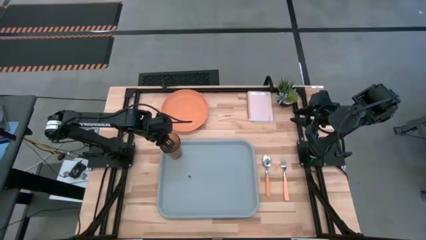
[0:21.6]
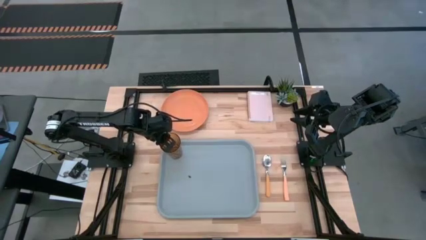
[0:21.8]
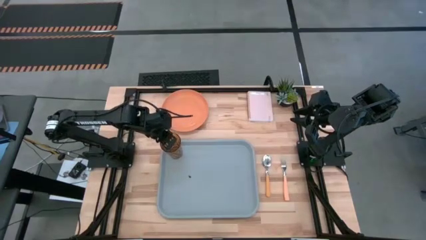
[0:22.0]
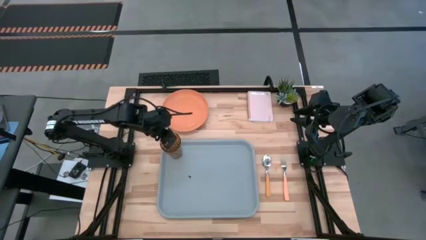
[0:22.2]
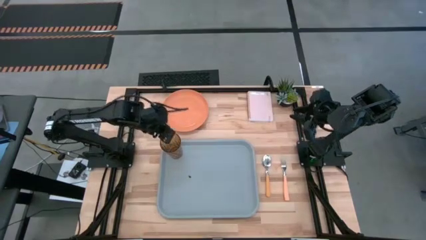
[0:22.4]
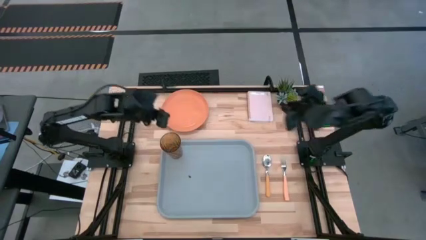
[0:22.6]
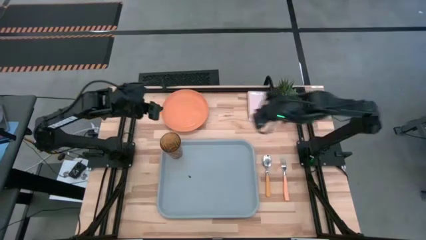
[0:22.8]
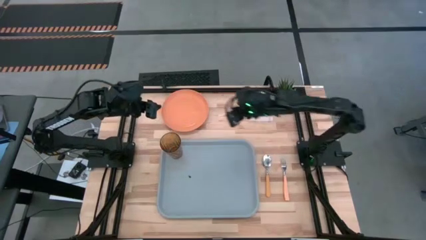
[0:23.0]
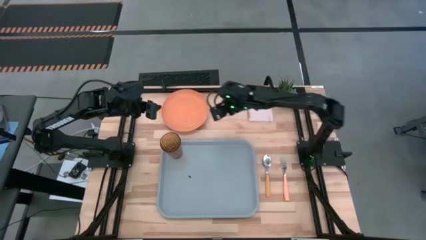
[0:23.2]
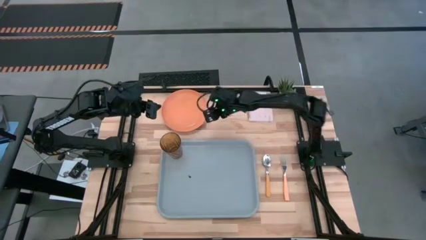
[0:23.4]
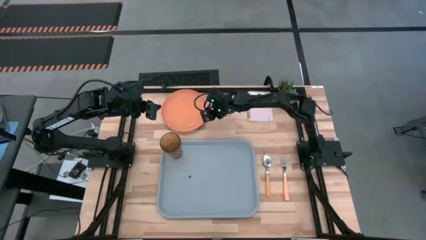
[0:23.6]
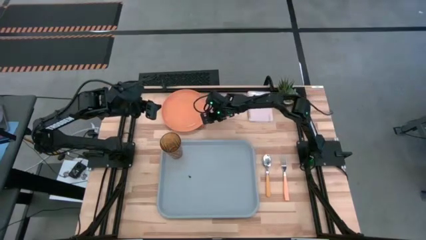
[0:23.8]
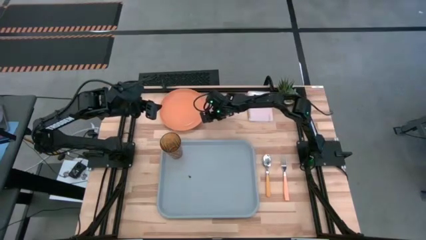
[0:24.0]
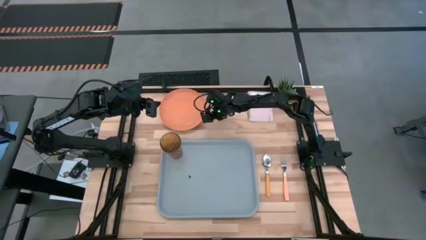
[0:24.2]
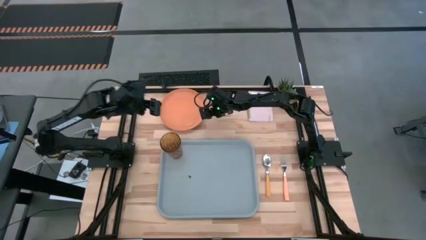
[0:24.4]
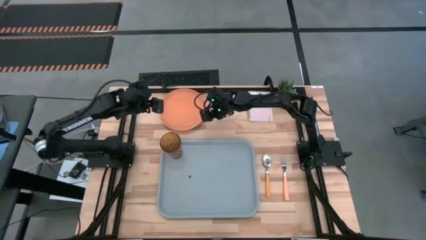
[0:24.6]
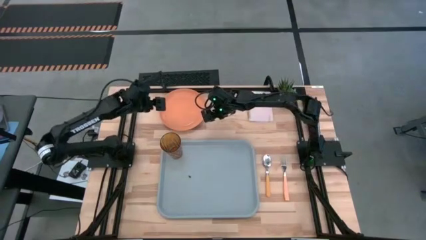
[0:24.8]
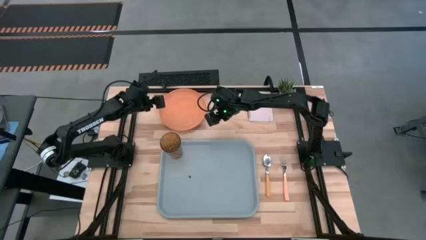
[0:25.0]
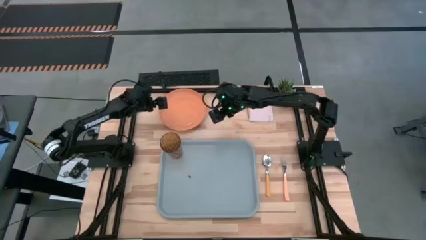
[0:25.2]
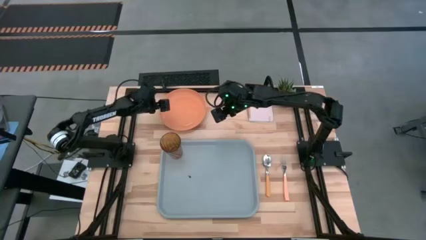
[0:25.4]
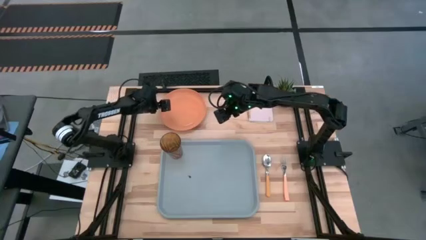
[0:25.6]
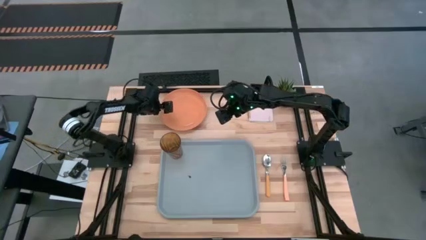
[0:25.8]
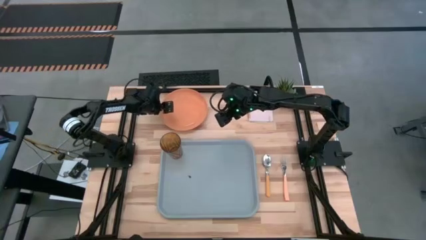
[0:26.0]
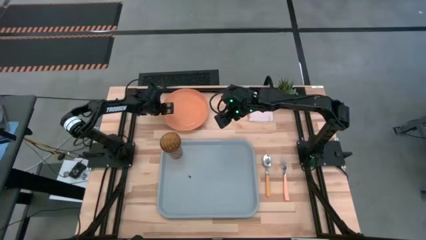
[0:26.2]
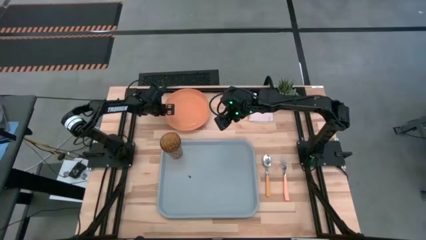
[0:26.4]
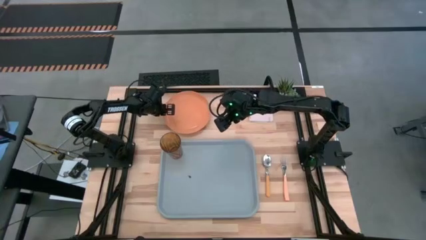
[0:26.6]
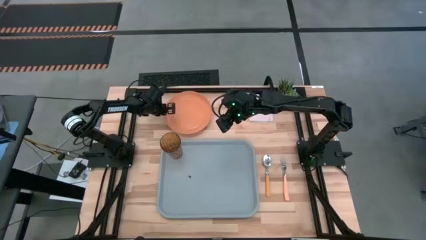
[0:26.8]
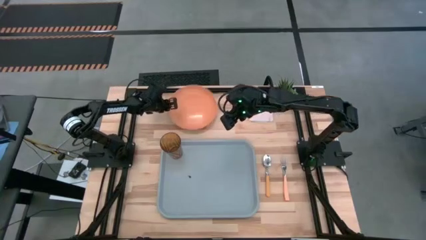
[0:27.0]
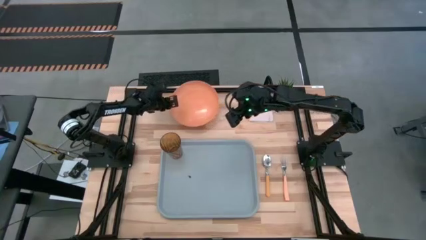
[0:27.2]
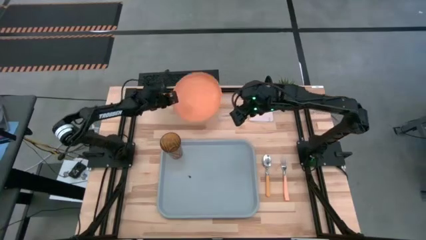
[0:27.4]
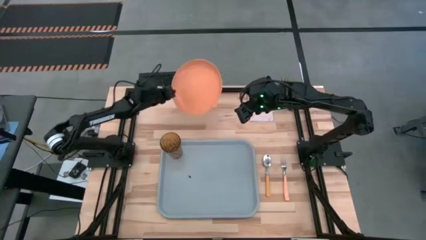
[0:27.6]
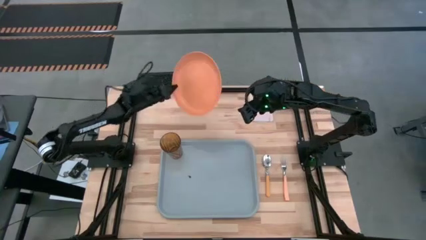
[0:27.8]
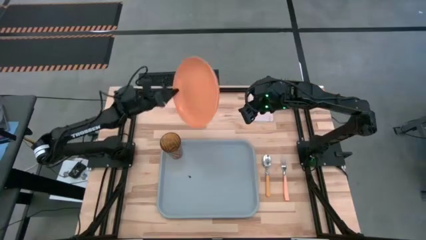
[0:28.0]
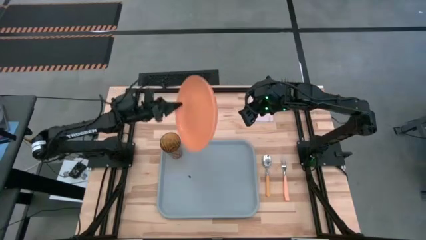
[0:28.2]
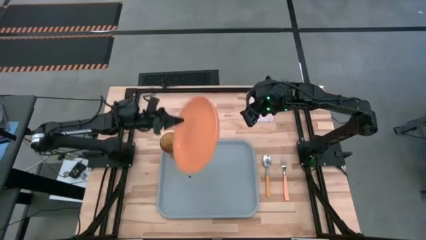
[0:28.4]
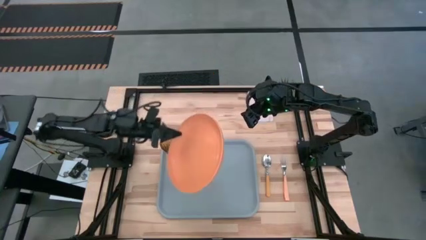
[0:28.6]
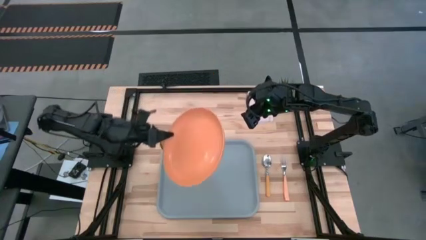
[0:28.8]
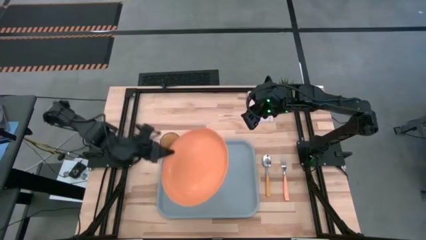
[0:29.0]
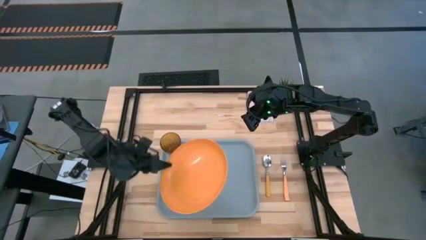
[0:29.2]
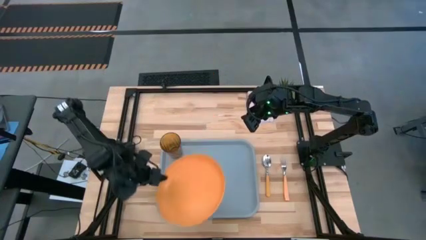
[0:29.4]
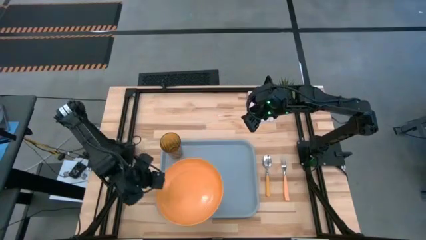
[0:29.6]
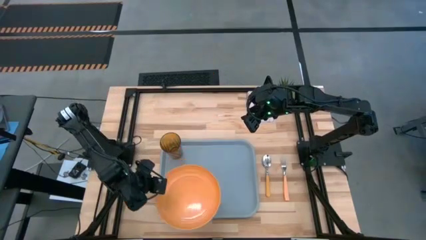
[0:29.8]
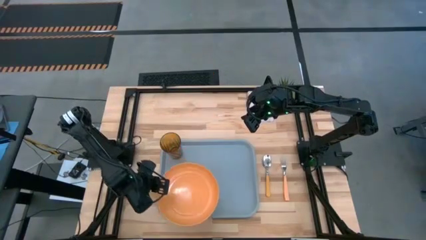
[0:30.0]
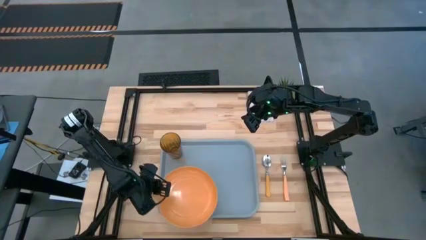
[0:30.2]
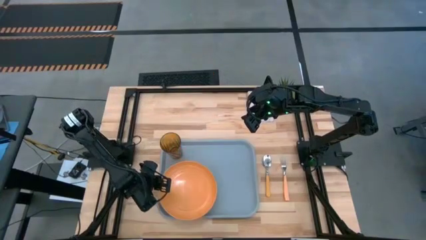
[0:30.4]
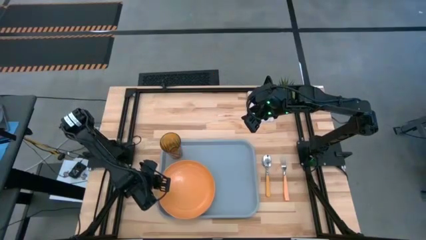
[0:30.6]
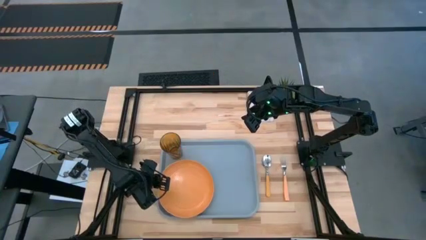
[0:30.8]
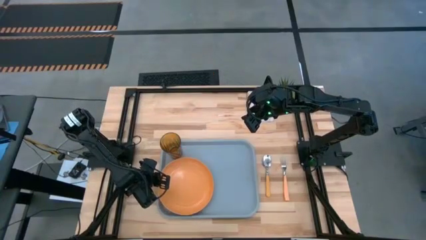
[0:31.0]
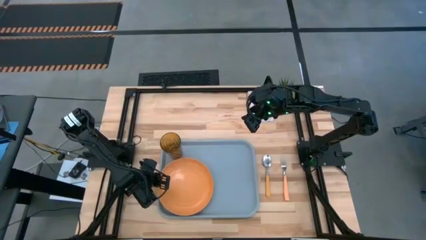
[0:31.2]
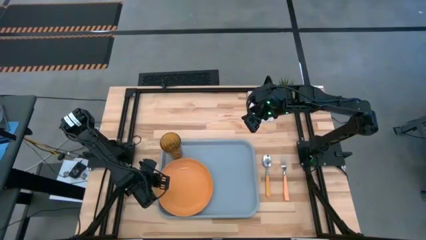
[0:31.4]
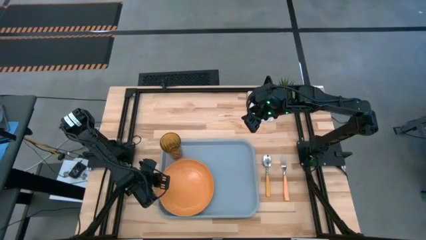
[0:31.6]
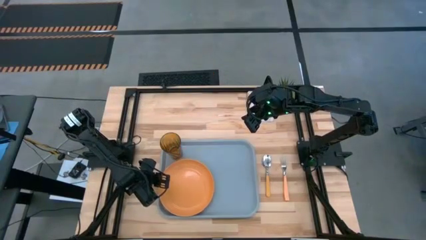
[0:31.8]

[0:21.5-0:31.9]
Task: Pick and place plate/cup/fork/spoon on tray
Put the orange plate on the serving tray

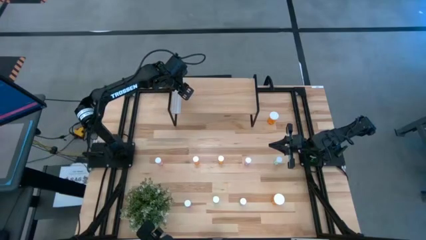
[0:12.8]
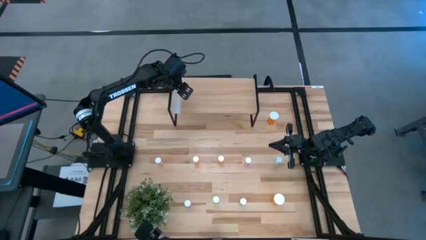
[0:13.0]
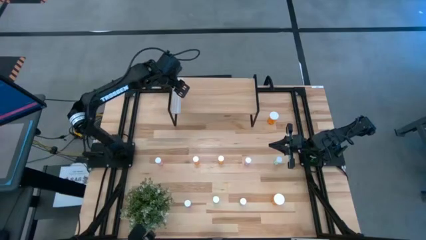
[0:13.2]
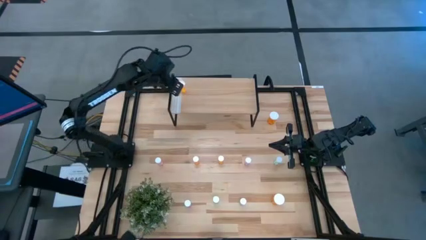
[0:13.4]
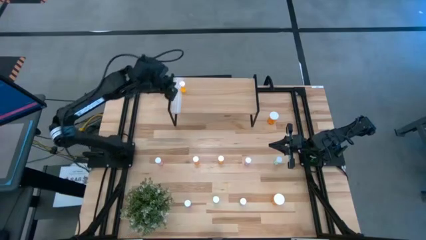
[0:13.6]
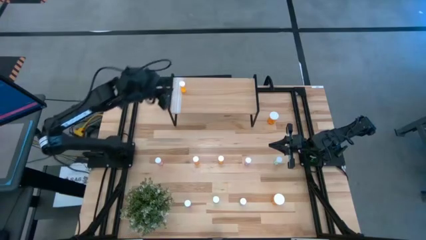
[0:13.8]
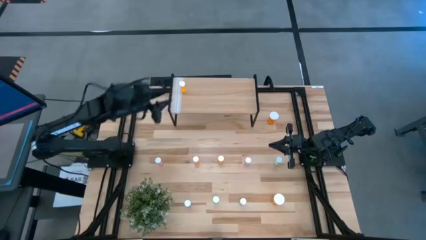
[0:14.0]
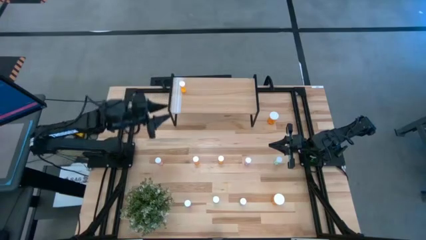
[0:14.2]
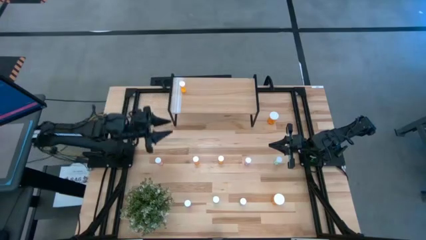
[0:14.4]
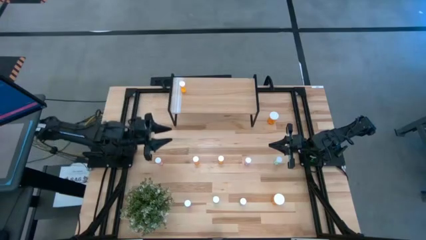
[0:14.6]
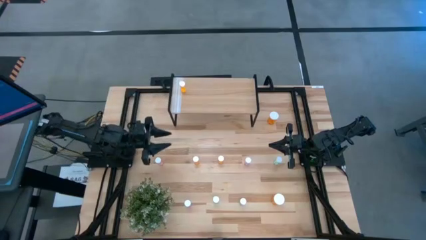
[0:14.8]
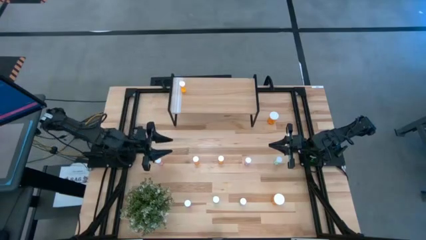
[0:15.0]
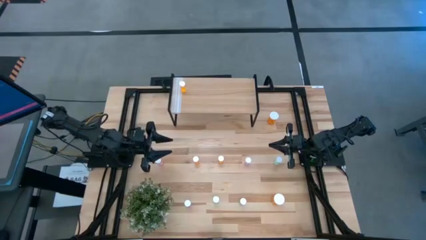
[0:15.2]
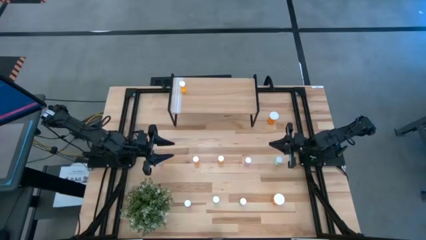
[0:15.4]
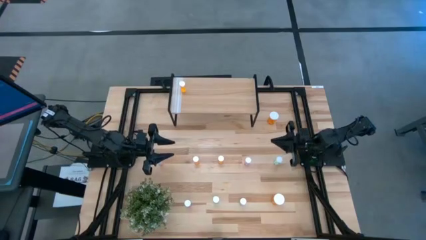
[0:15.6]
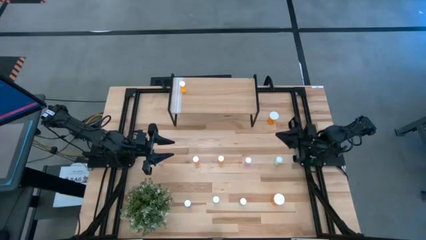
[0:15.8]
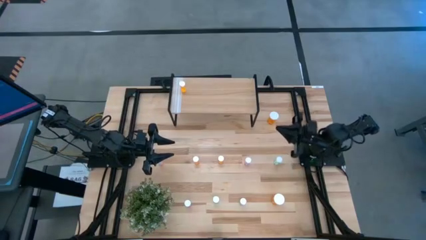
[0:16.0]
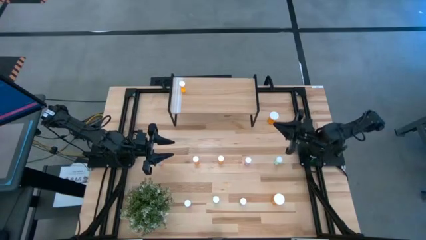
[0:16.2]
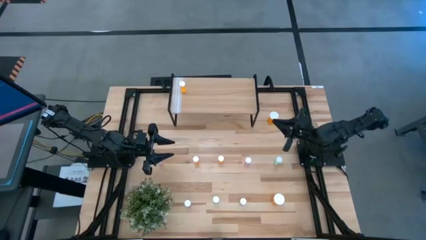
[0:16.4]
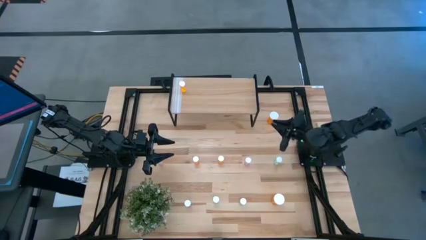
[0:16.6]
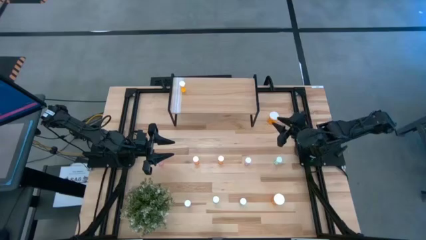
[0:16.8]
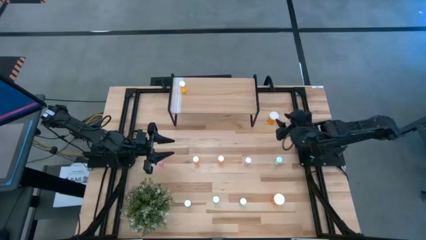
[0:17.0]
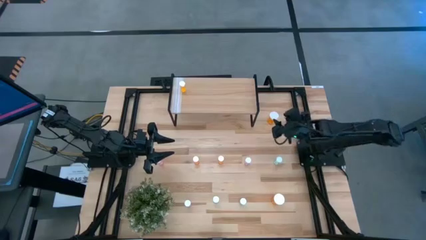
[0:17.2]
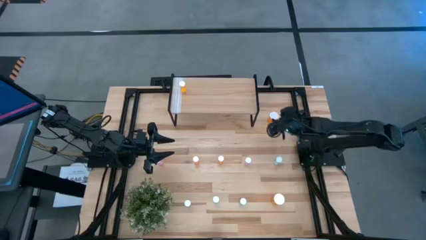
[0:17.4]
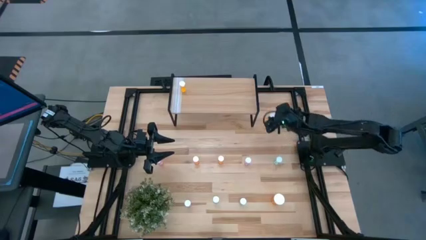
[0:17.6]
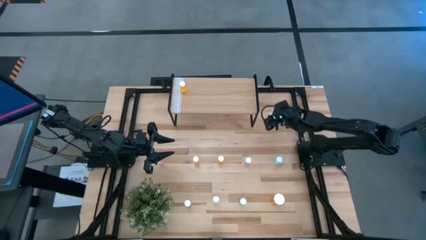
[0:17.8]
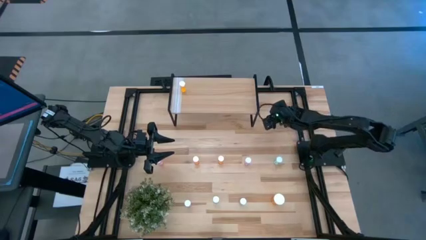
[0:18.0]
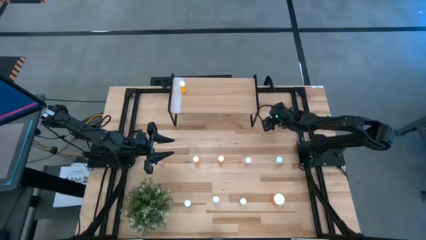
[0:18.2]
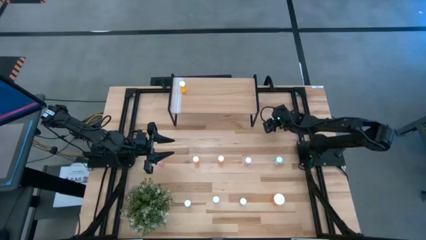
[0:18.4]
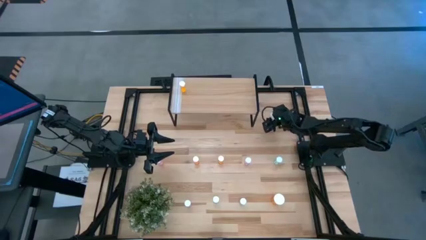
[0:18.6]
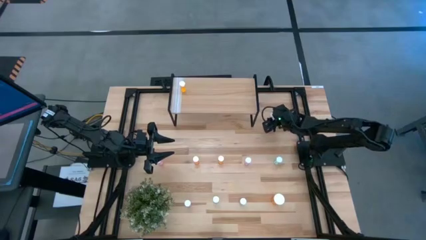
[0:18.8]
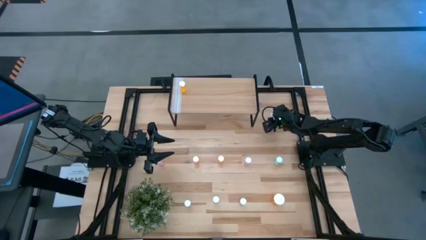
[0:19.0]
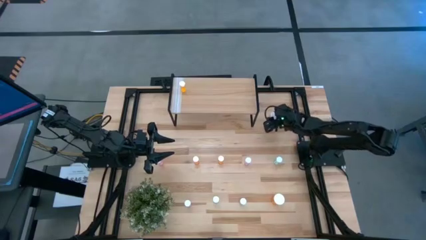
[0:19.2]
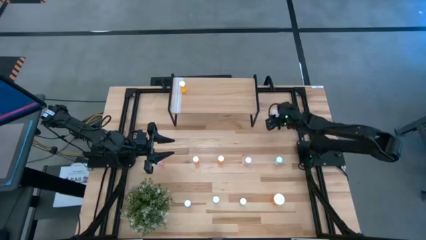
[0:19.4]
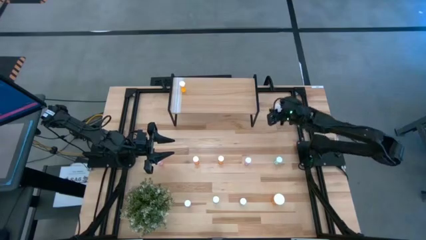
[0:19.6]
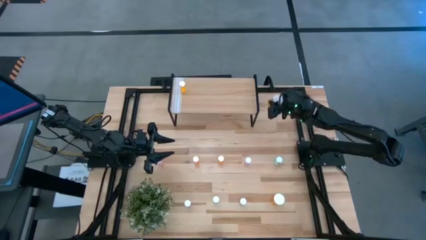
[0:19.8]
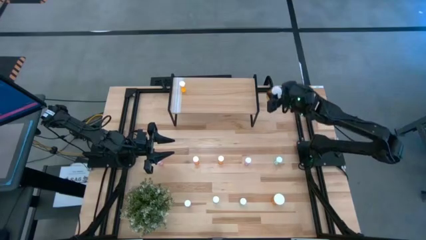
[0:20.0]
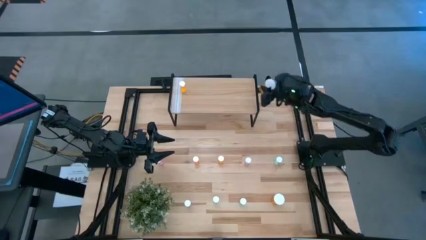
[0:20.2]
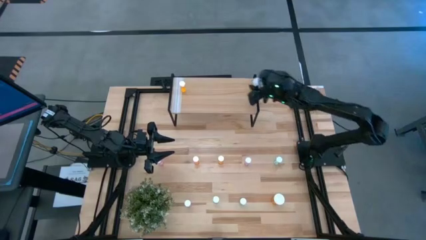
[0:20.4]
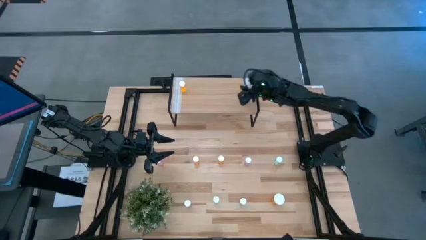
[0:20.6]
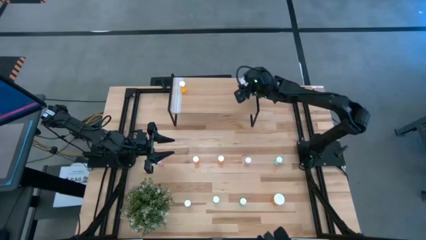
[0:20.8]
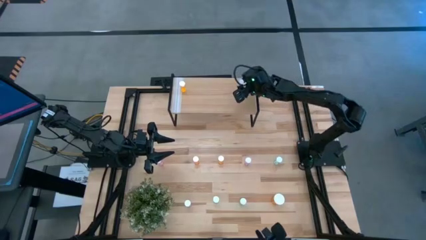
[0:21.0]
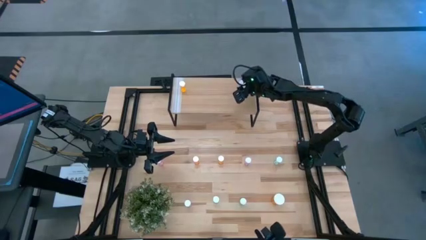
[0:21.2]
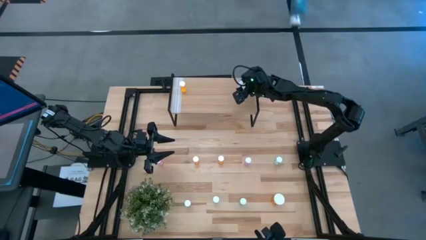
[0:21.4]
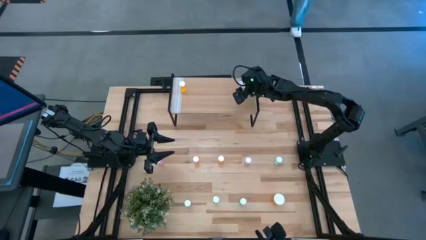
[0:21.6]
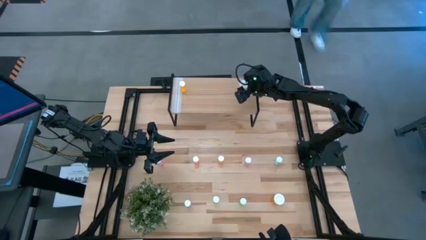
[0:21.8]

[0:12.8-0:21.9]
Task: Pick and place medicine bottles onto shelf by color
Put the top large yellow pill bottle on the shelf
